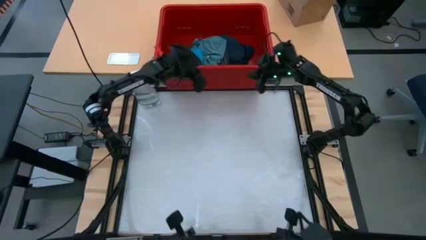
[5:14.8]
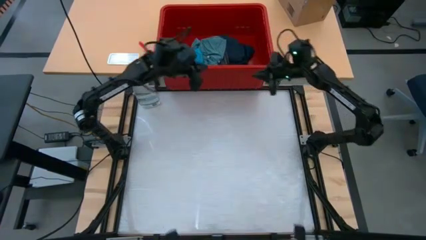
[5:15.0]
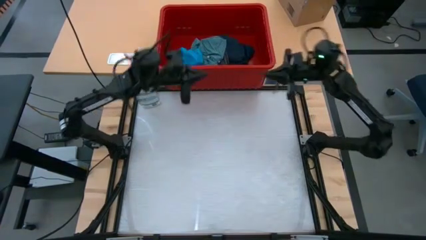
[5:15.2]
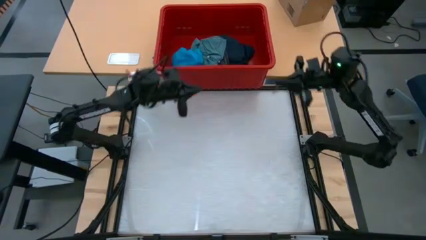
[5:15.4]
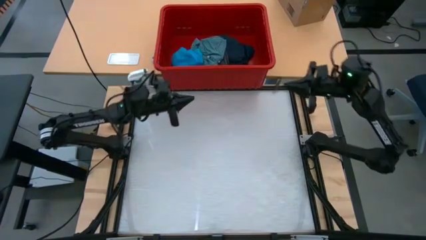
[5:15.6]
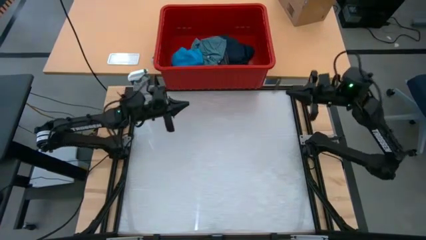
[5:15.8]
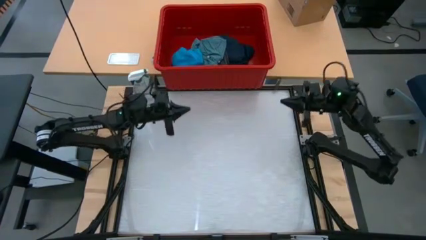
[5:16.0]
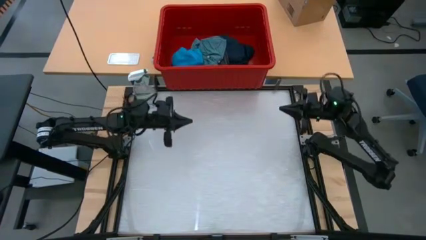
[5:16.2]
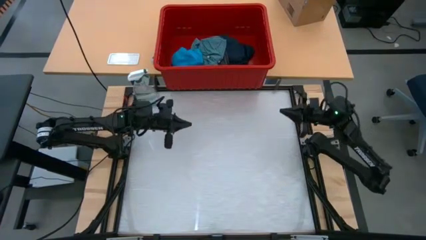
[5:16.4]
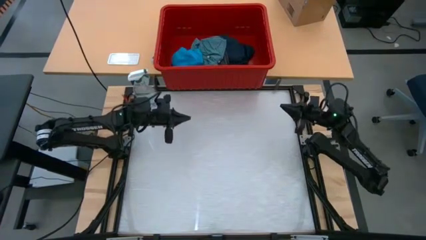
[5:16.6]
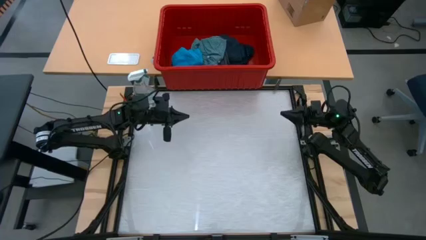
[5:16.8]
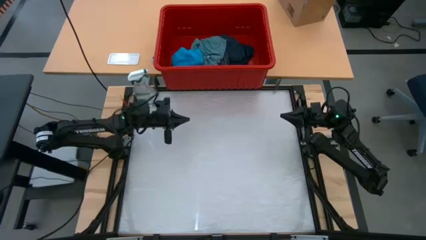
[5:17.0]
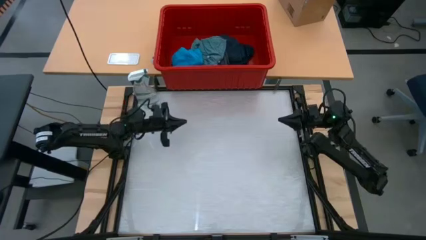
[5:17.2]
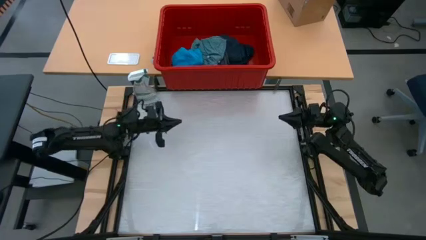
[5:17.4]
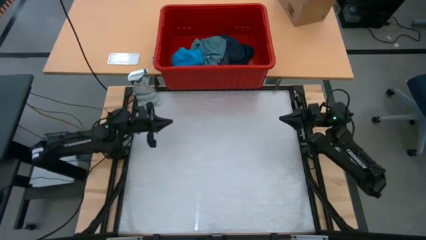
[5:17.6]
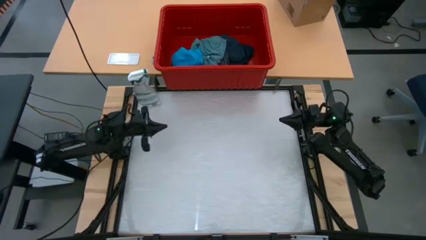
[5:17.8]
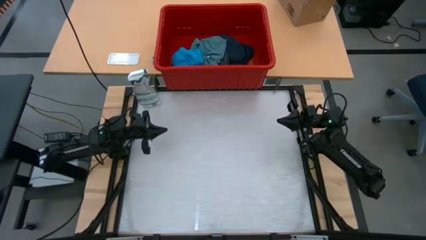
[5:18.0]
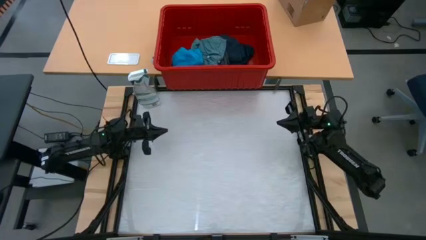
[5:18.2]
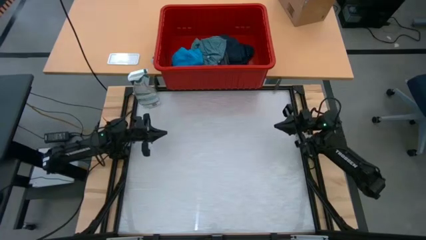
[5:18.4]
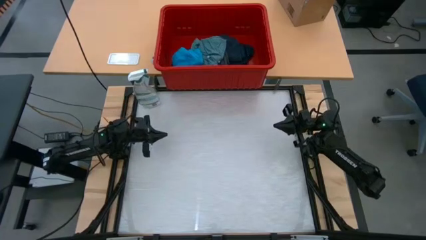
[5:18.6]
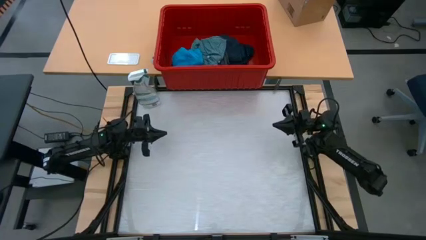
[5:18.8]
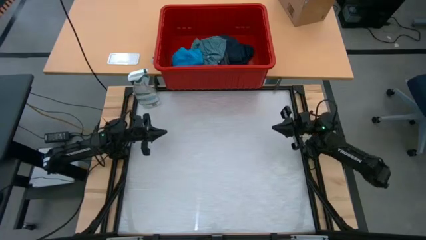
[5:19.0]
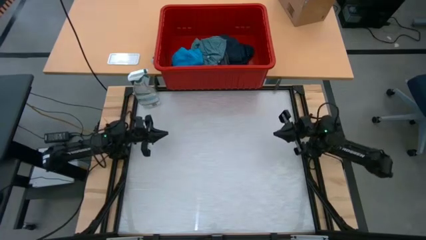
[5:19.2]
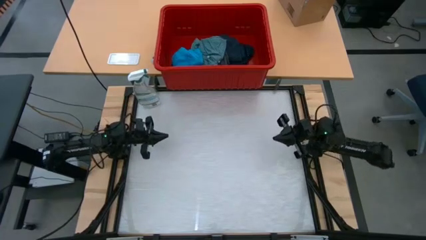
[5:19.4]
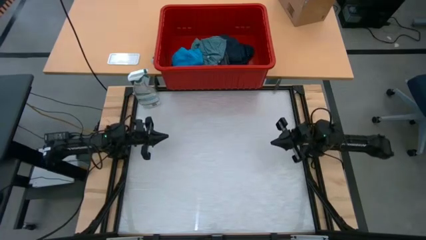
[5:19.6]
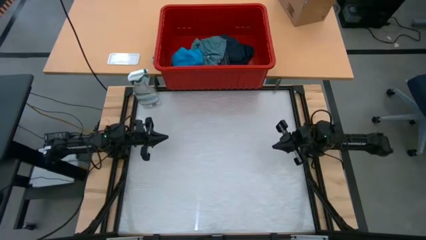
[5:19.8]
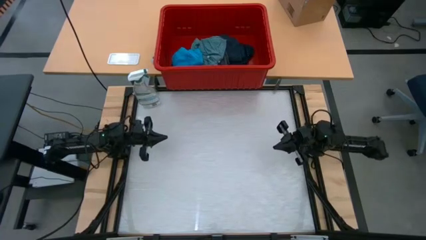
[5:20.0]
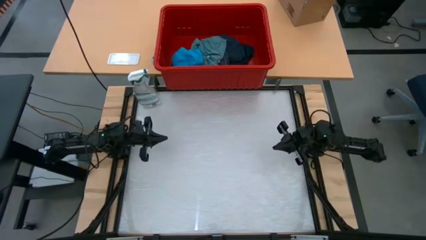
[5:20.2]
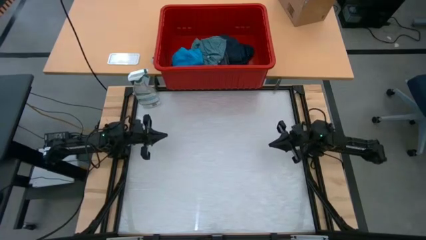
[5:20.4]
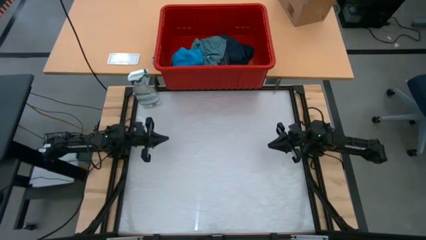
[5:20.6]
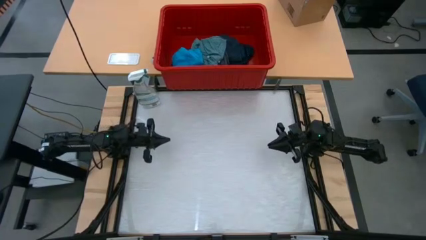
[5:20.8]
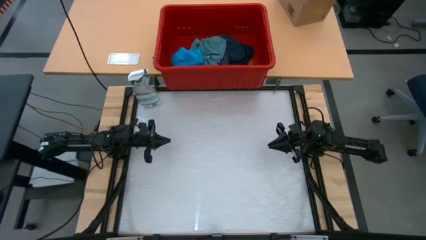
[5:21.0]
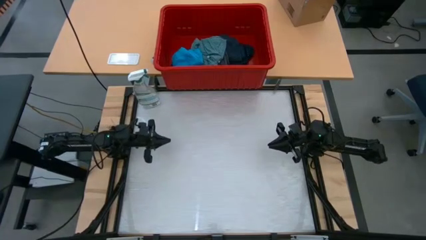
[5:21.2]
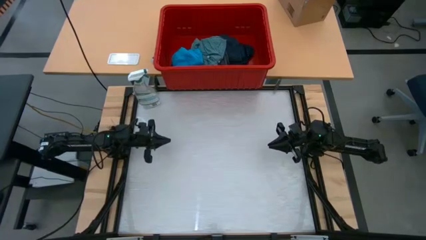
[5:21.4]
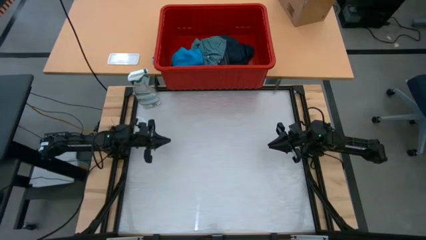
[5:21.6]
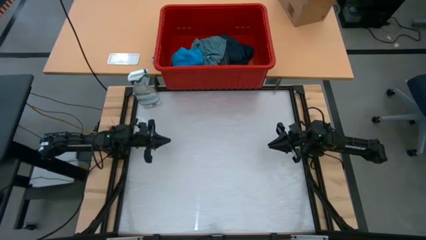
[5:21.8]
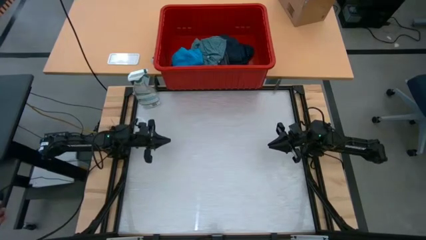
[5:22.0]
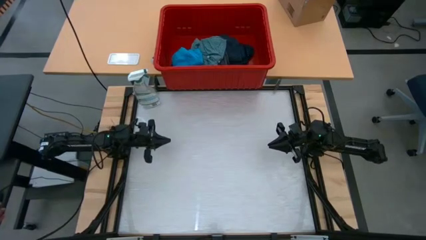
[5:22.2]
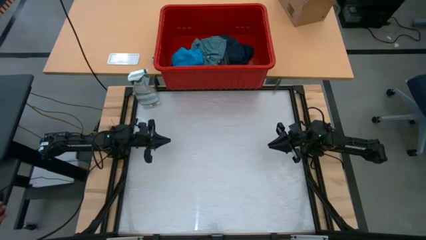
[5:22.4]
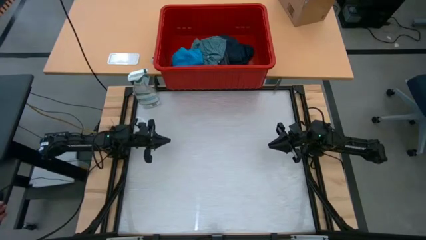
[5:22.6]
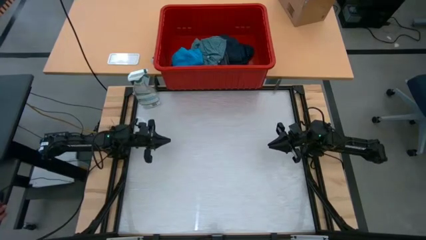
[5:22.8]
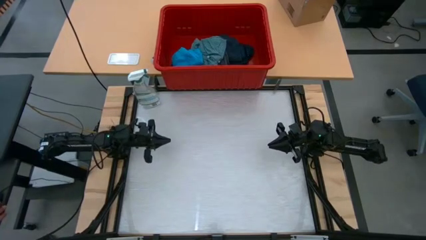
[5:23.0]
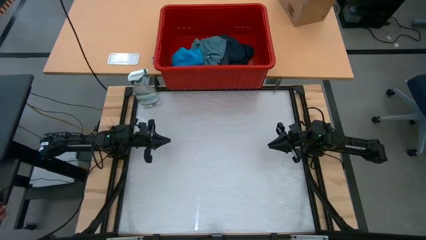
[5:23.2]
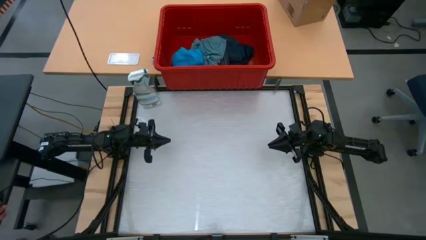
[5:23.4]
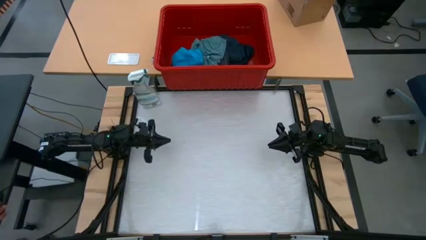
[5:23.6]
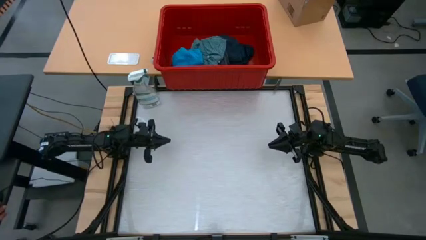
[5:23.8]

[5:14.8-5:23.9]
Task: Fold laundry
Return to Home Position

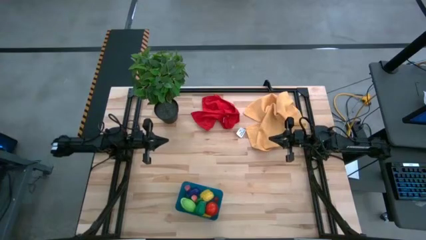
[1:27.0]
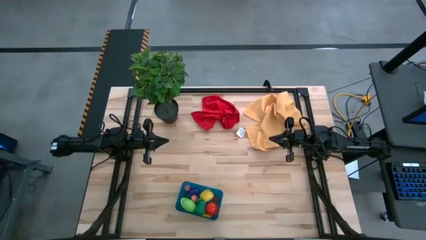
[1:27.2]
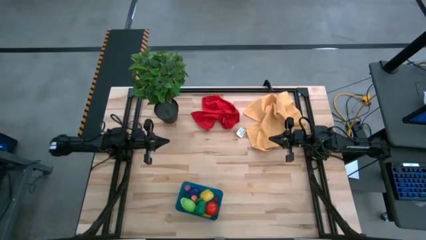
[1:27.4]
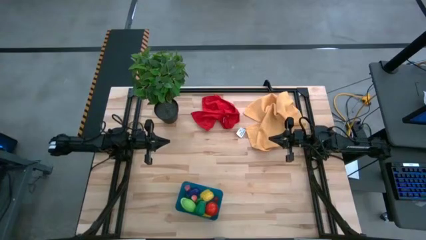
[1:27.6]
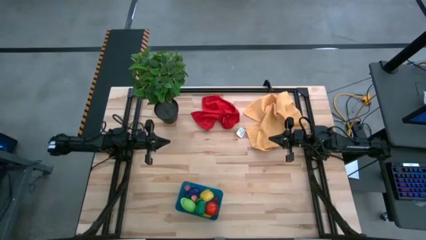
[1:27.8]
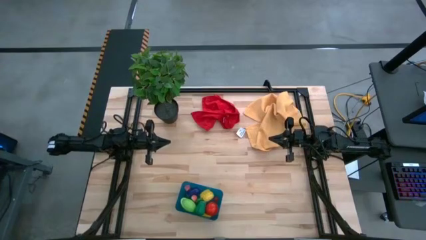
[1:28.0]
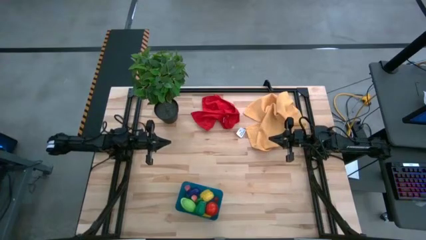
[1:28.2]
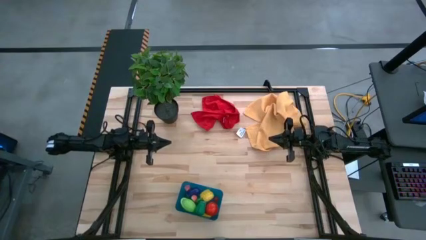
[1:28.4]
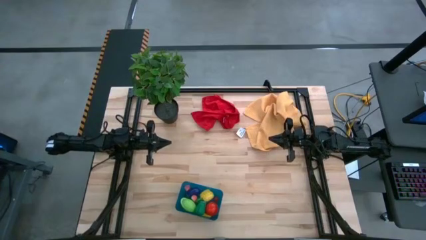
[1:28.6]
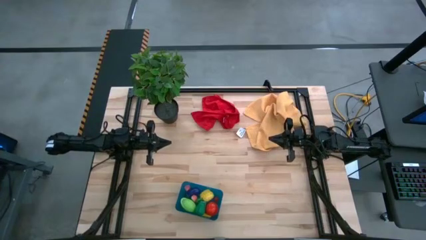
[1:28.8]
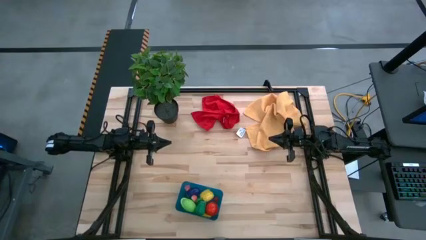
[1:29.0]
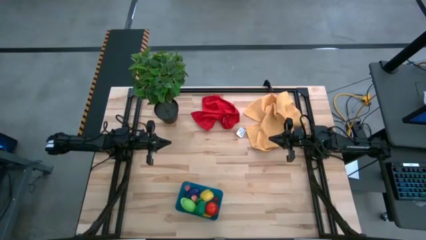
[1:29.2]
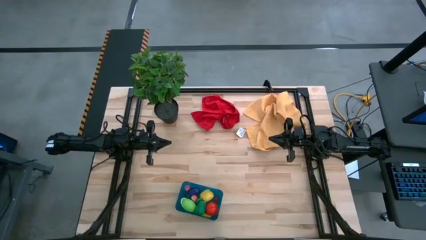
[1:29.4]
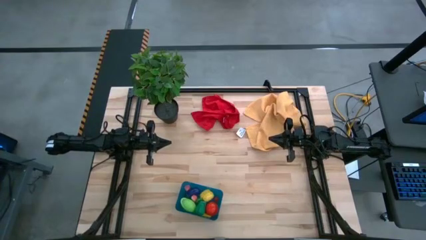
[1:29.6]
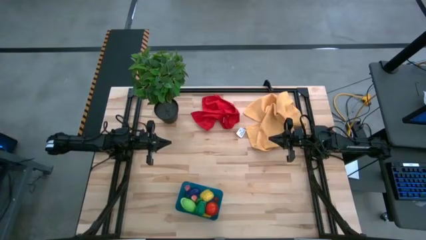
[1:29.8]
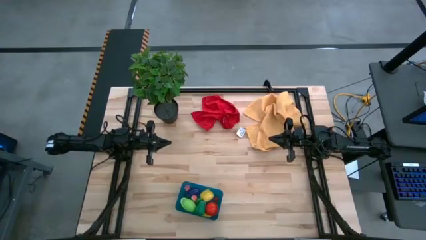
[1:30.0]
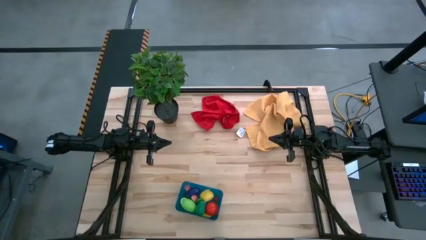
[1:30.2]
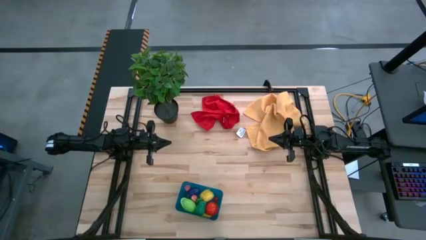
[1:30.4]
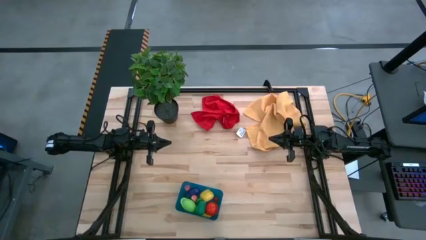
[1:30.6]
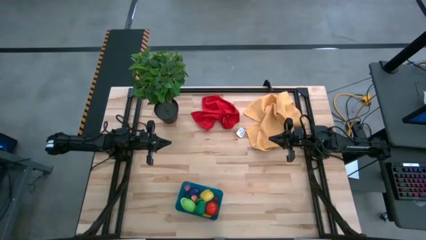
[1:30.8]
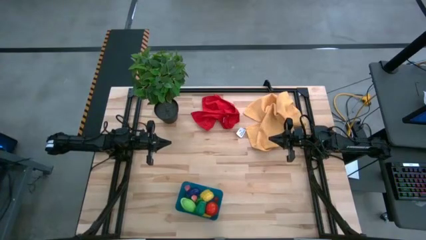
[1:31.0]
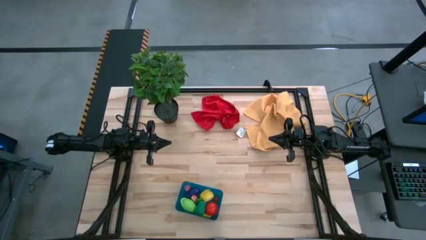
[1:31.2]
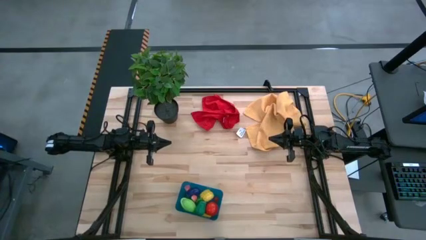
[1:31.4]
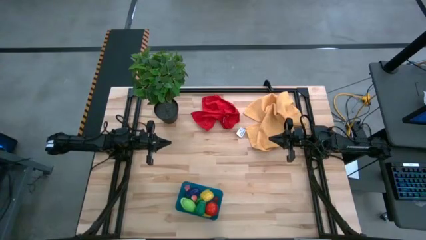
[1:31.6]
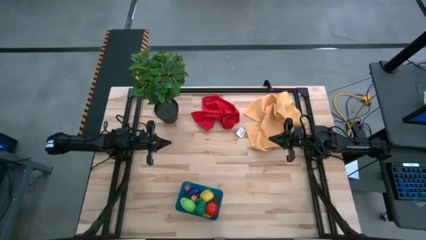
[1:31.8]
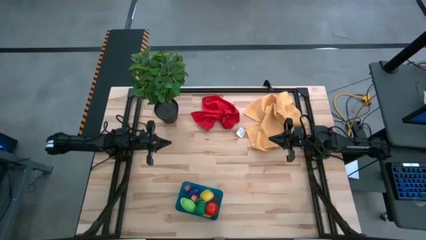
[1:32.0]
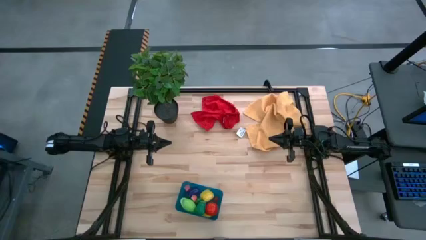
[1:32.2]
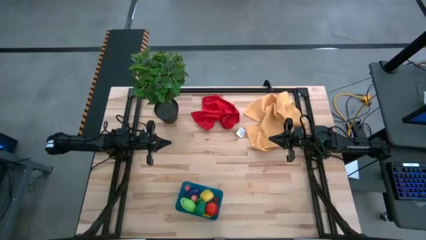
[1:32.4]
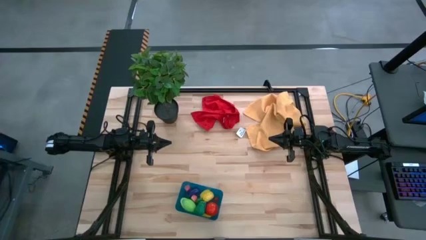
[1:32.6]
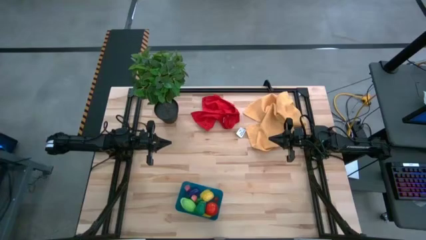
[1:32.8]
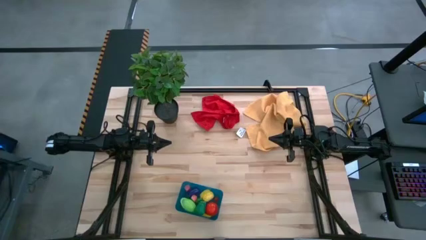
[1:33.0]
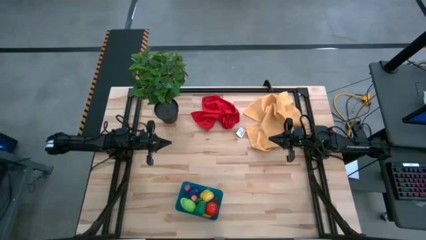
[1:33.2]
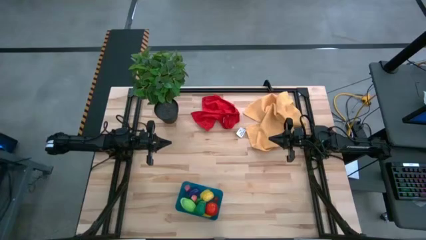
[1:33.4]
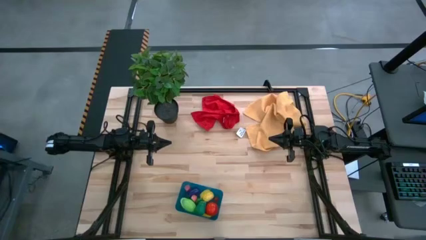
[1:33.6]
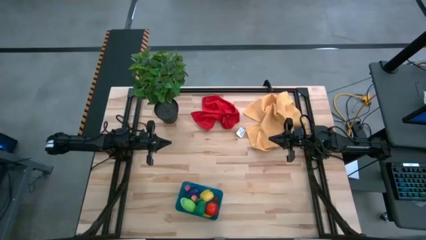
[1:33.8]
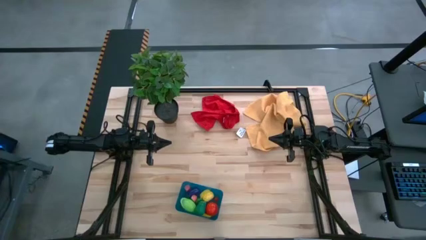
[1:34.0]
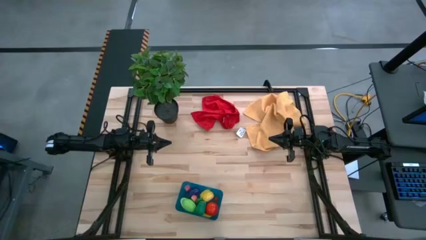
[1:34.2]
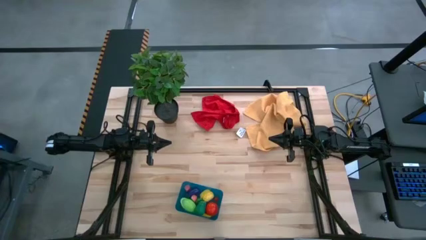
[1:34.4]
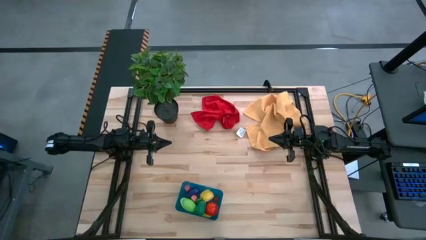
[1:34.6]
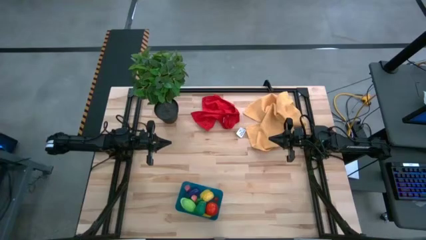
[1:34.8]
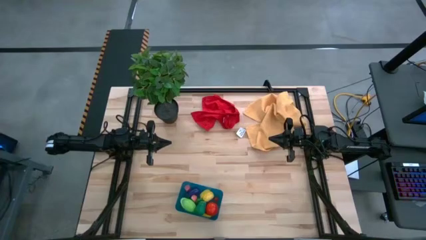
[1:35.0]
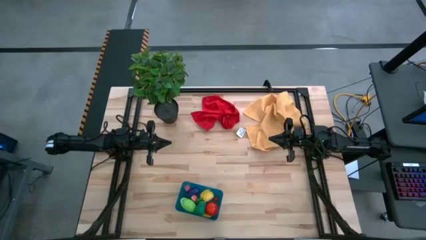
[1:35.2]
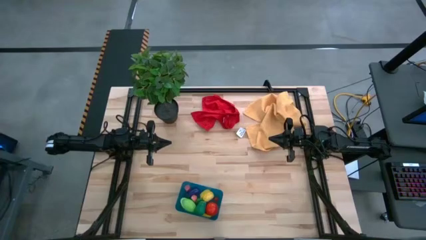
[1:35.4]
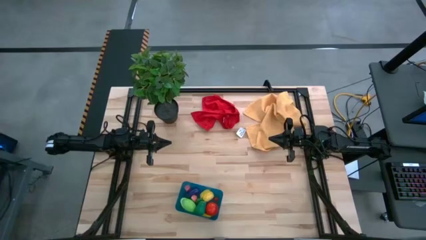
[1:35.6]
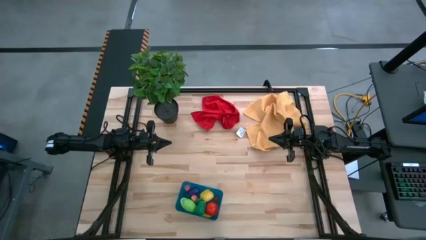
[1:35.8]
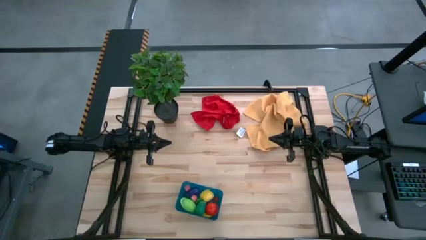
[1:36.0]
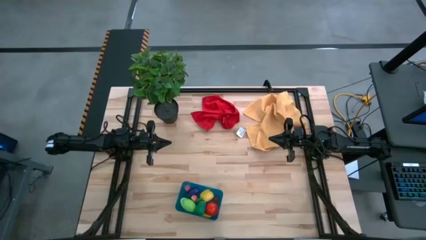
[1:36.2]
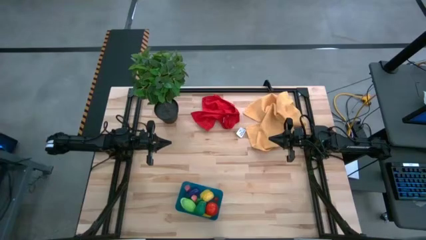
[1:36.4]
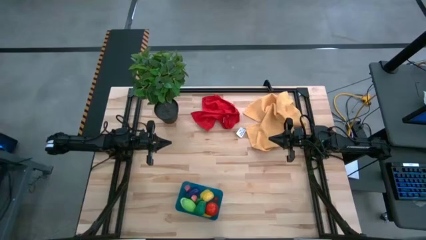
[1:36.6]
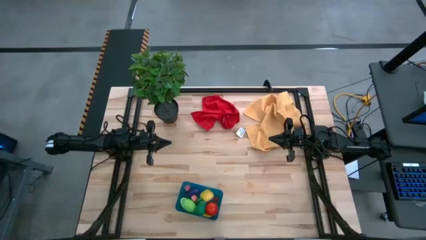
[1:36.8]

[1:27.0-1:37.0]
Task: Pick and placing Produce into tupperware
Return to Home Position
